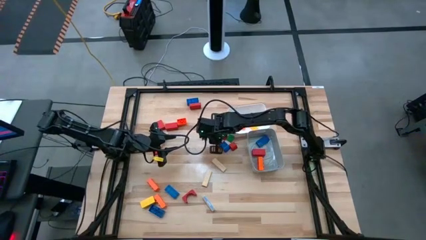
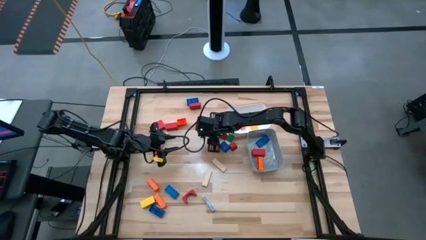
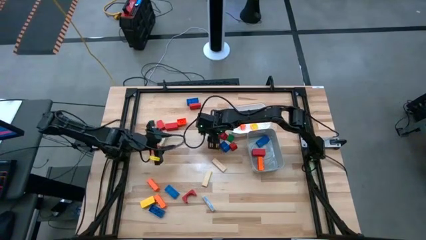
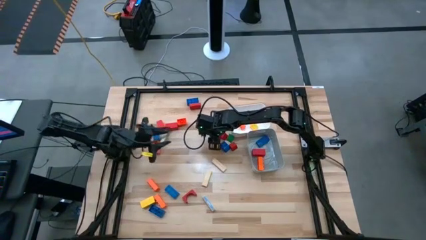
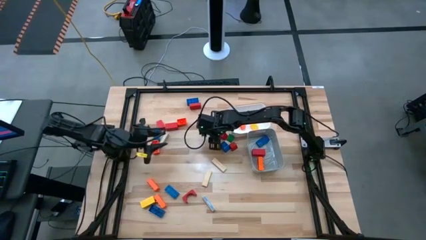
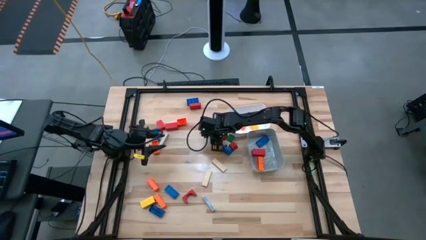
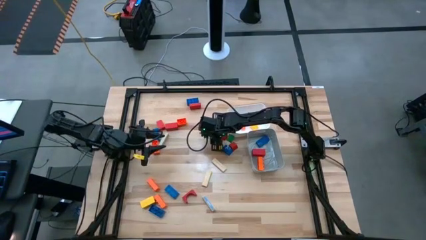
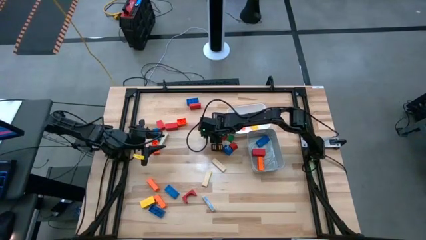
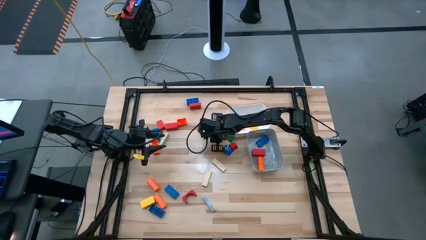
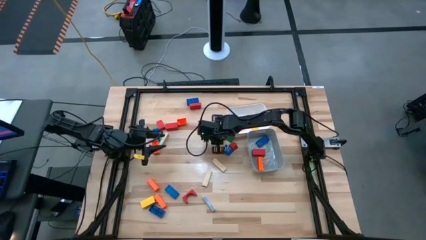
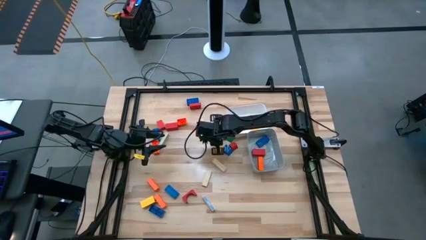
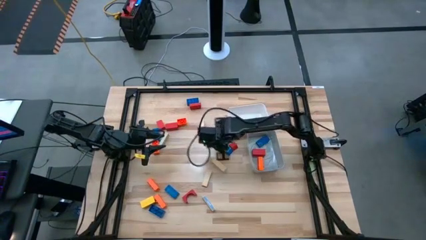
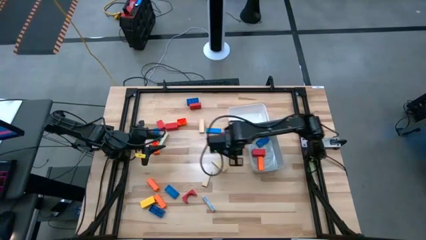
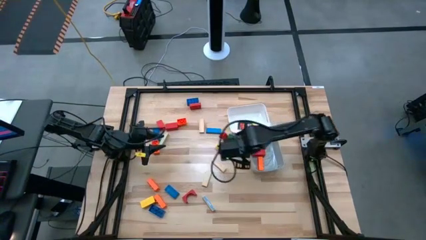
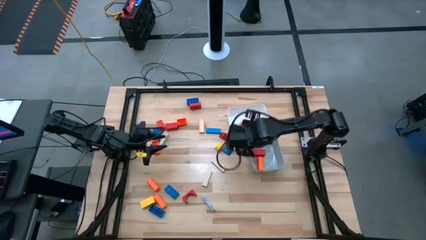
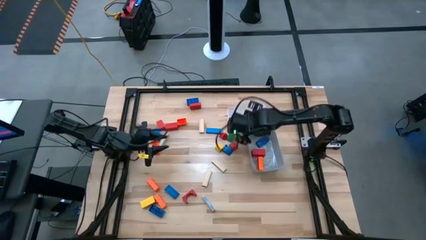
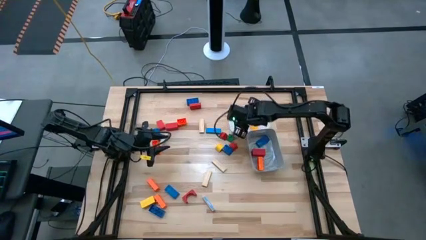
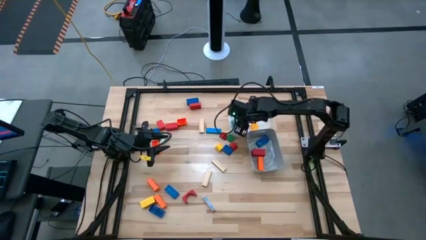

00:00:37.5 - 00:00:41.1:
Task: Sort blocks by size
Put the small green game piece into the white bin

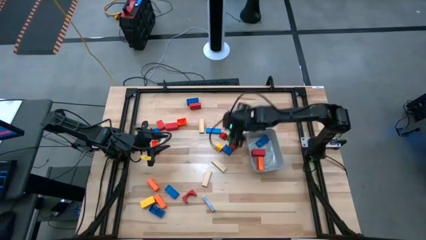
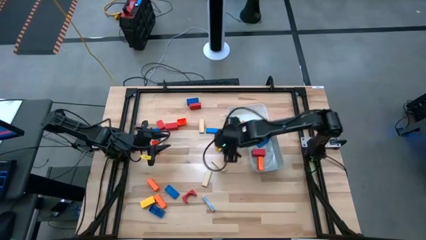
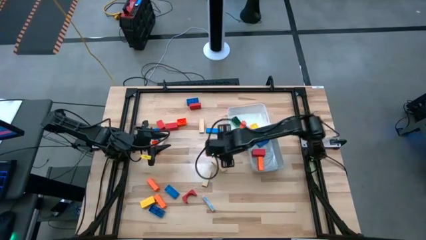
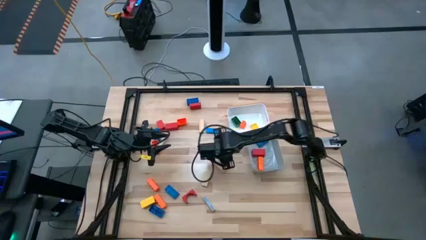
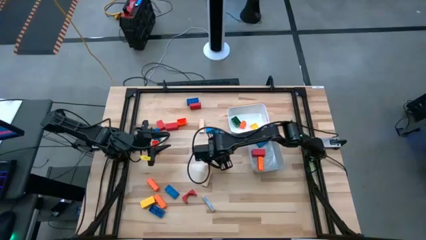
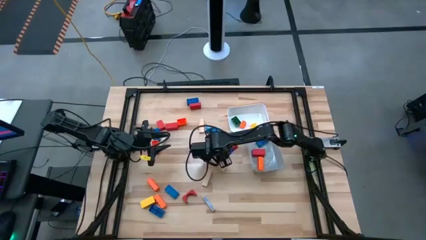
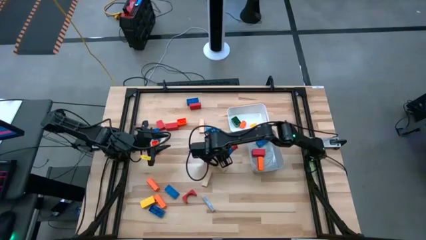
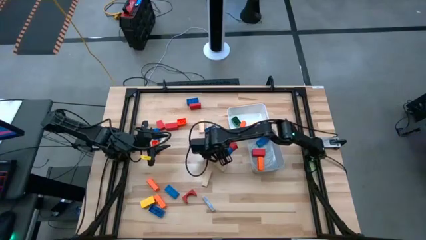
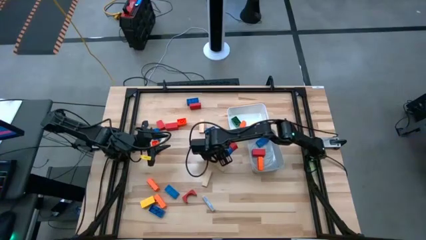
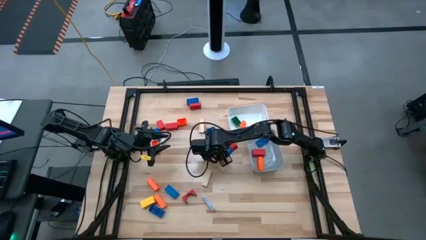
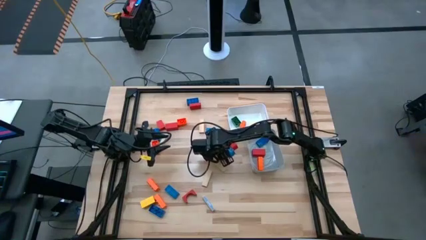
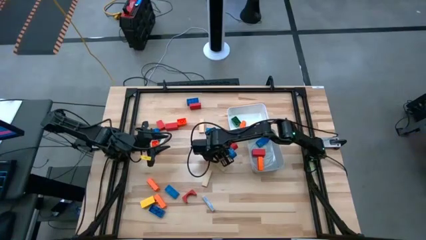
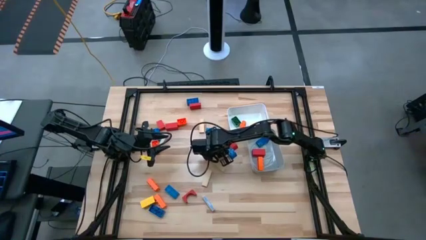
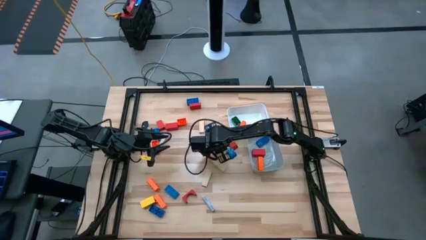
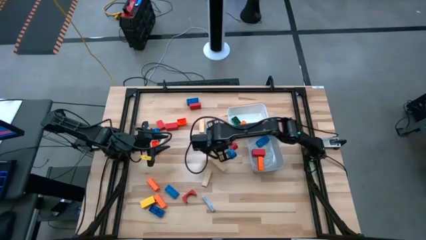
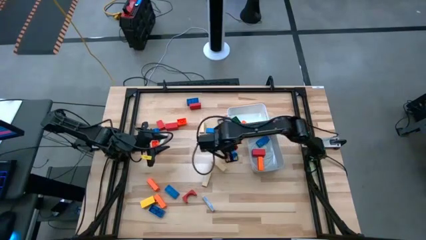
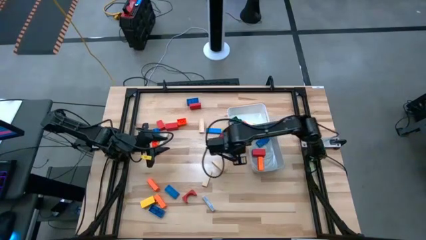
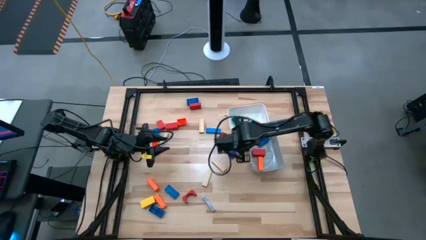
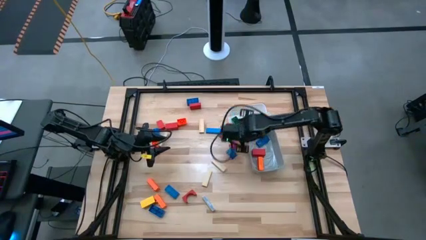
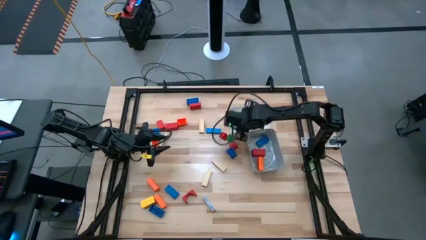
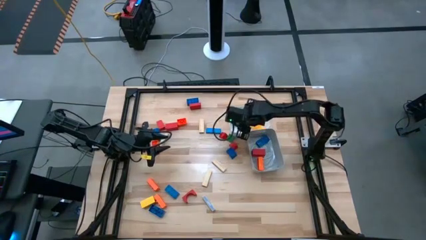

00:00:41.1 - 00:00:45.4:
Put the small yellow wooden block into the white bin

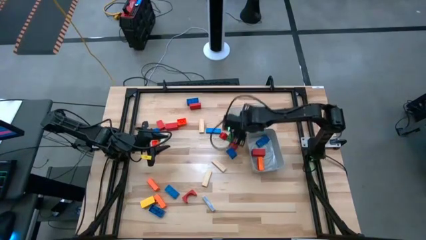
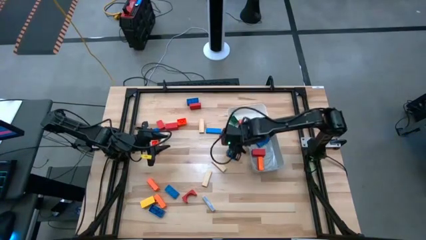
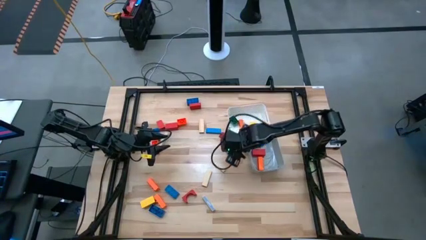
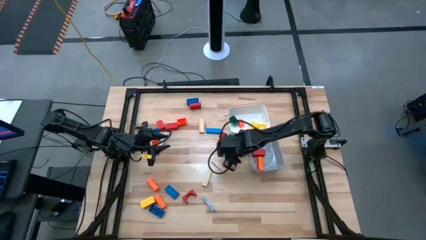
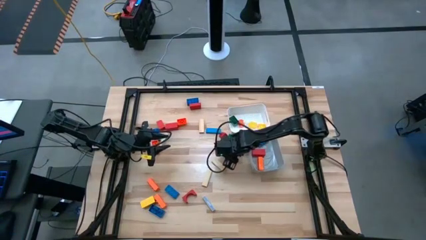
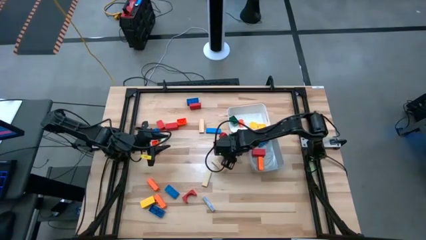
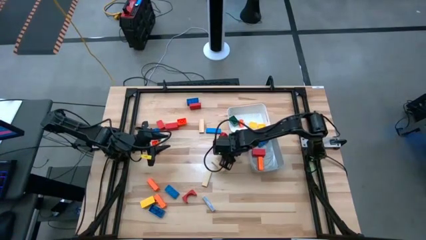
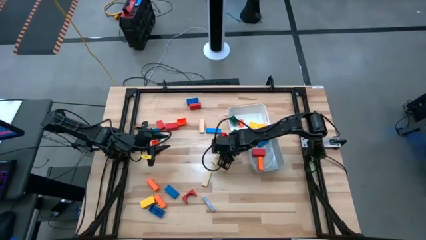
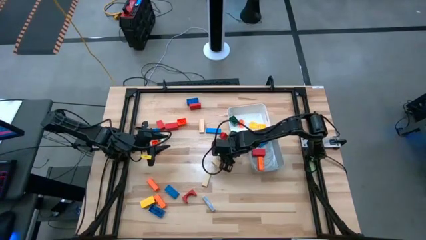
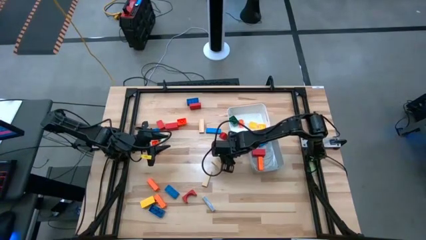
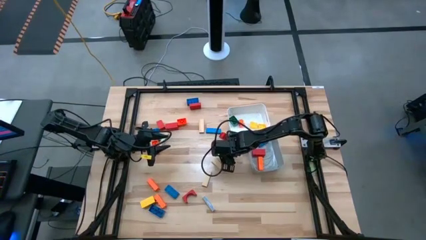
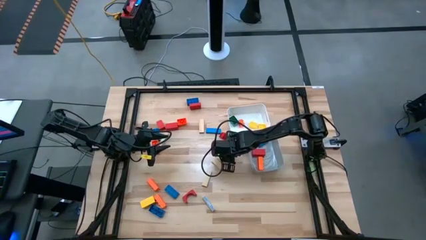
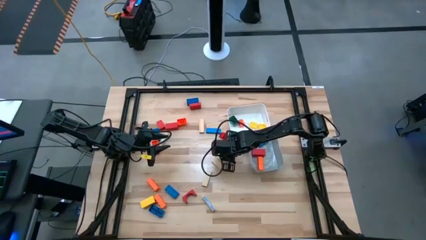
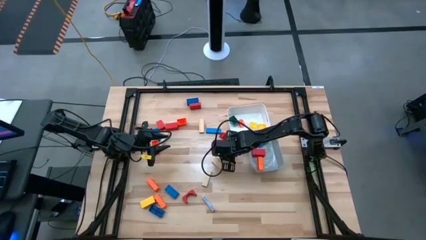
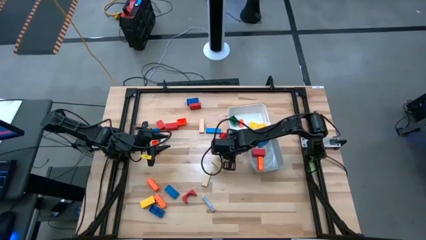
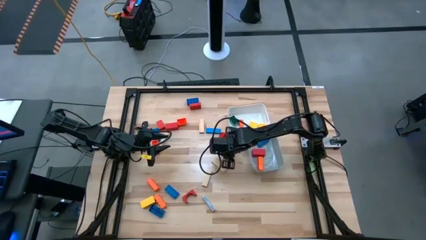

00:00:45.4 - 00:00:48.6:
Put the small blue game piece into the white bin

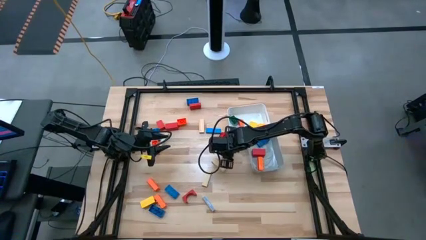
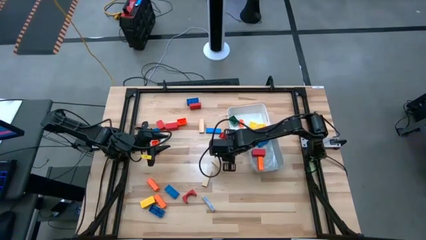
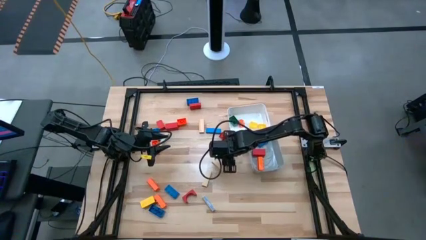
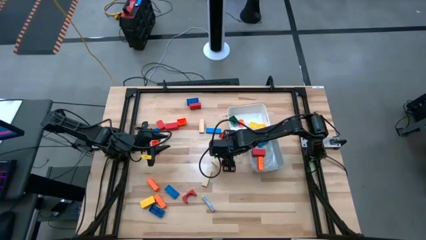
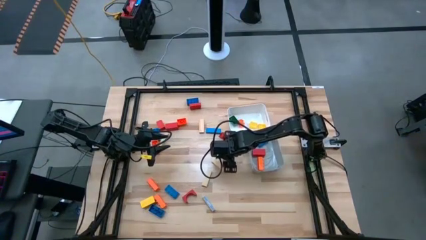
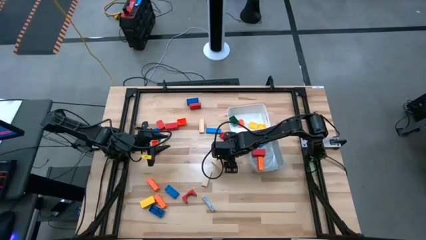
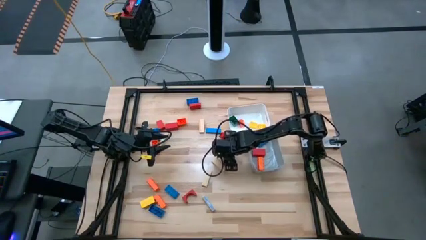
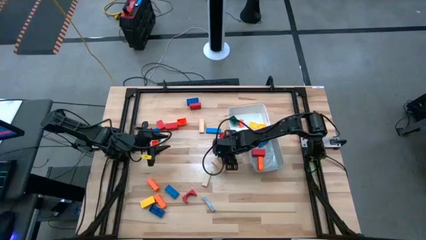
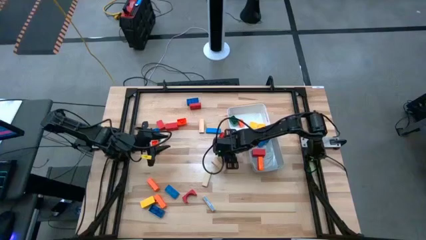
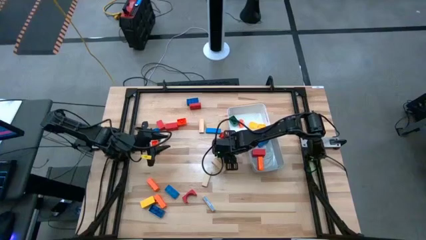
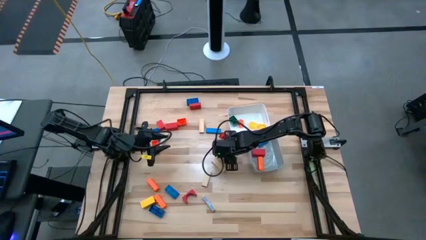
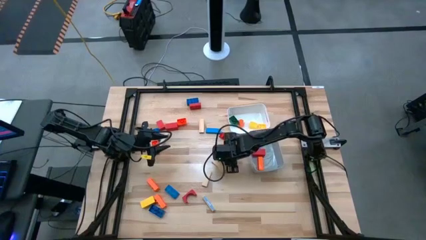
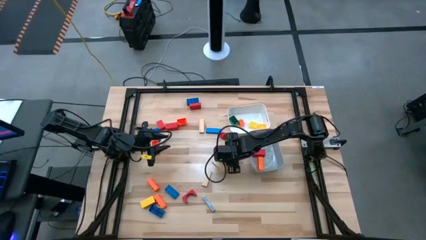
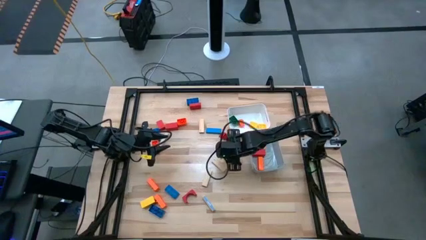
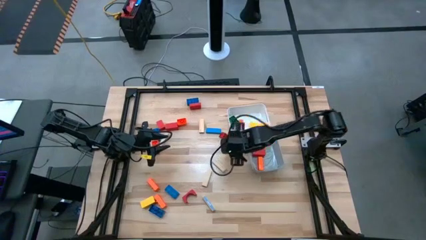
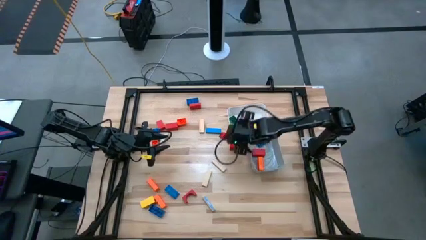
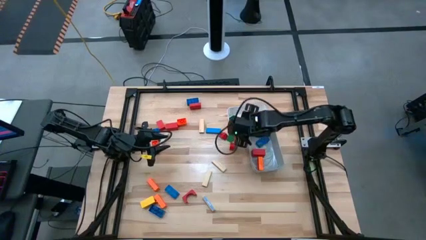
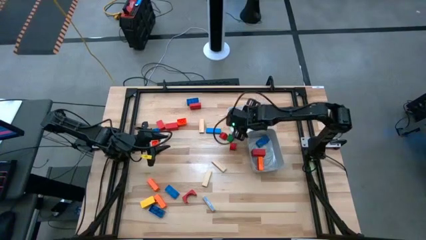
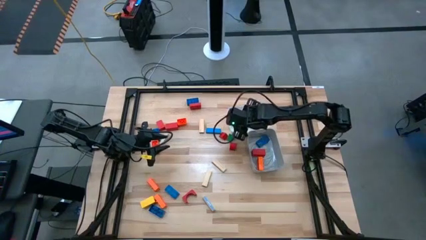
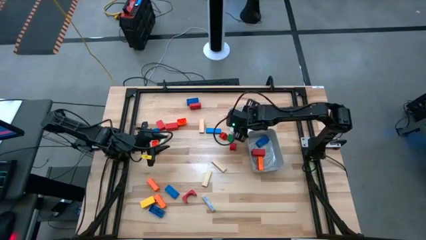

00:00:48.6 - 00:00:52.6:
Put the small blue game piece into the white bin

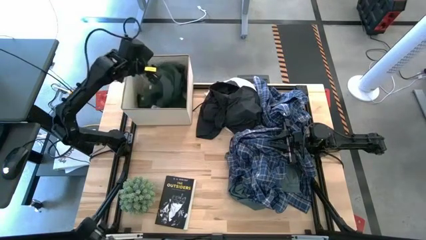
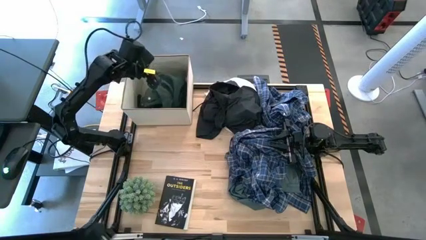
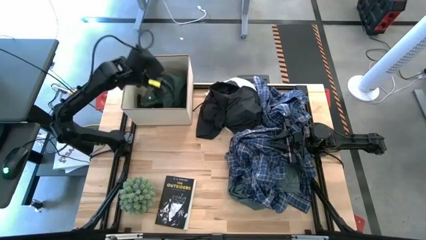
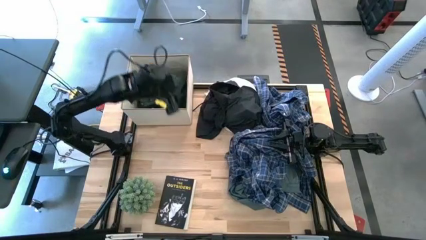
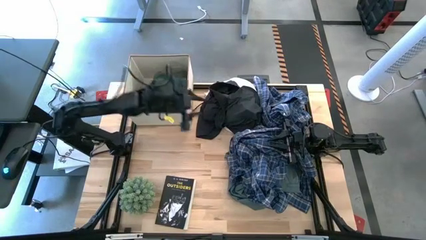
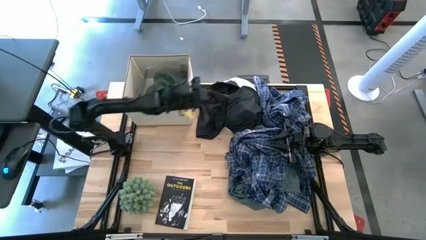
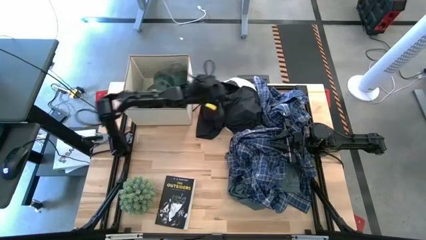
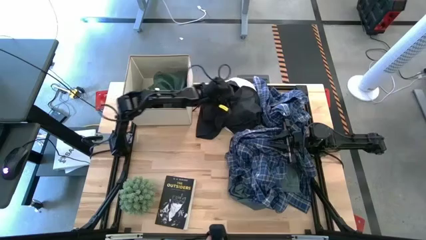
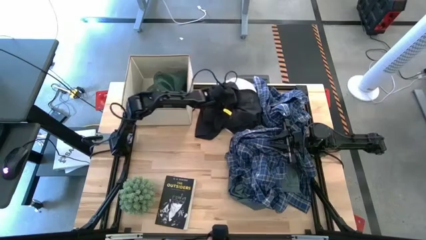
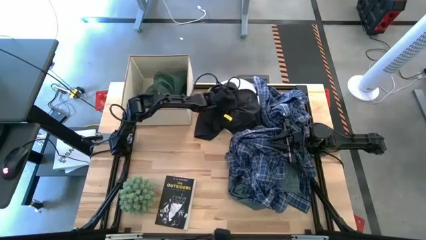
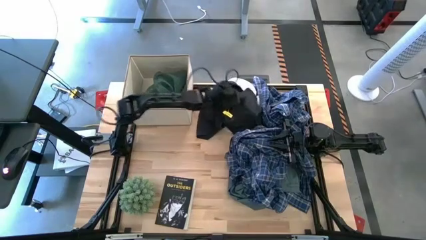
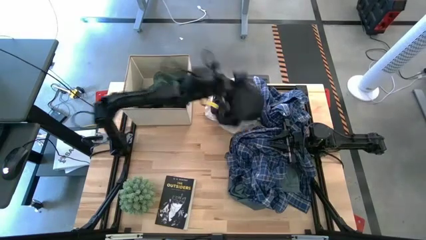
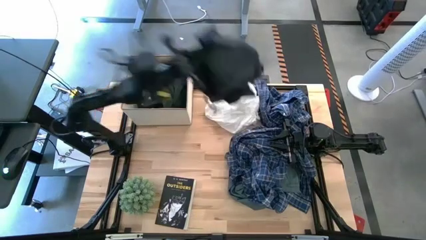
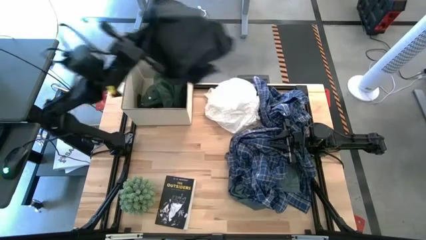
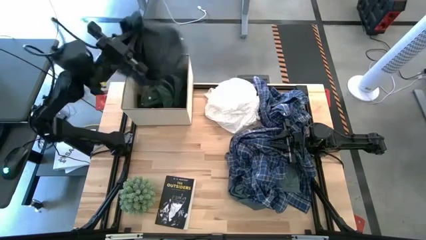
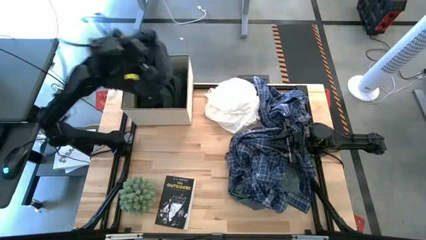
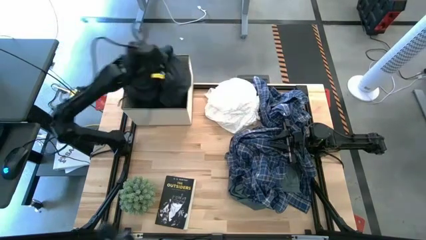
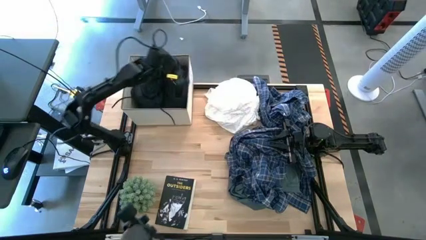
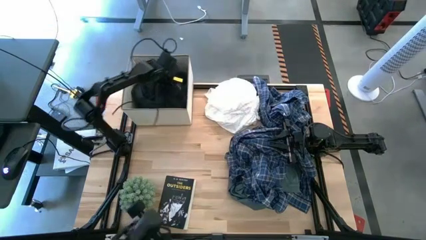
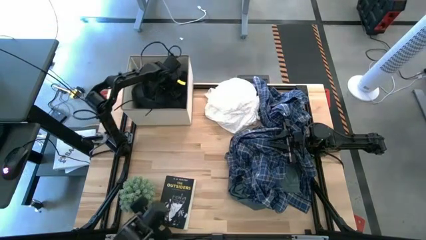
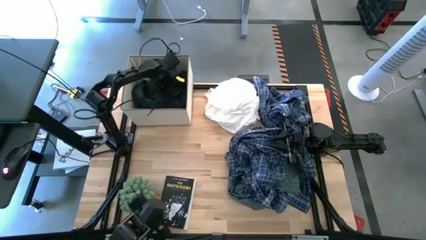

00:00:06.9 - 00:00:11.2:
Task: Sort clothes
Put the black short into the laundry organizer
